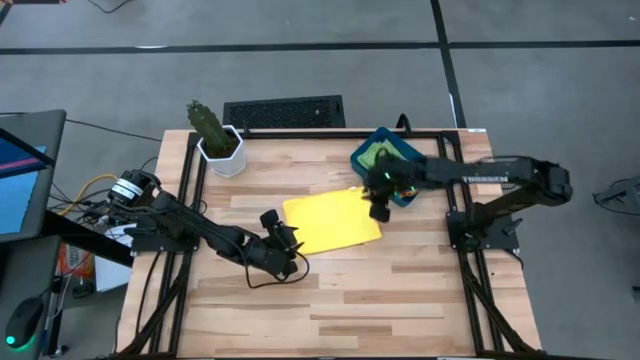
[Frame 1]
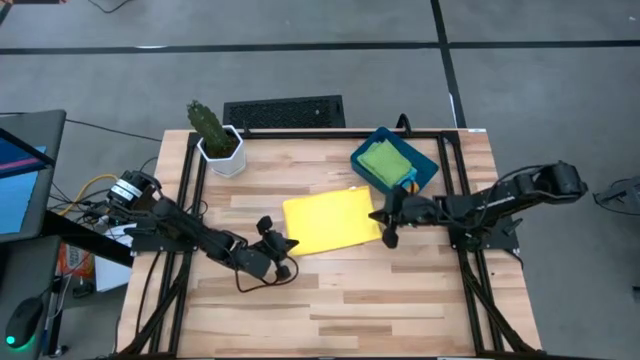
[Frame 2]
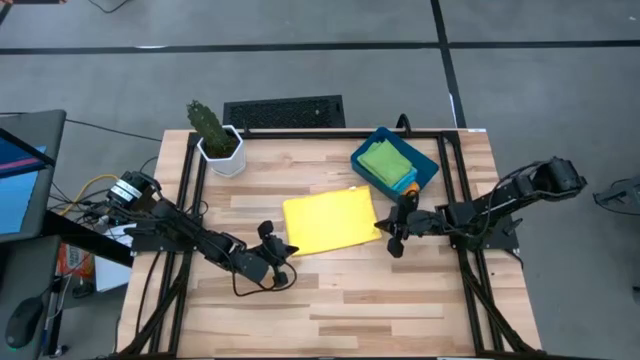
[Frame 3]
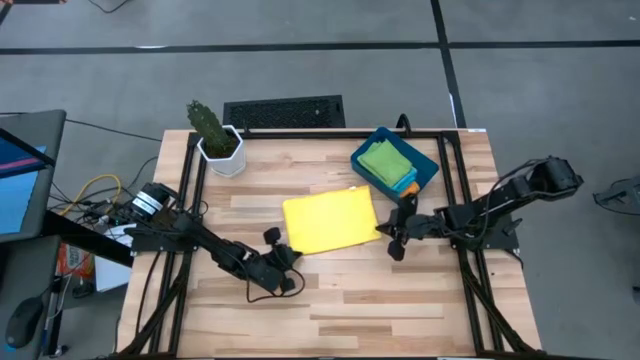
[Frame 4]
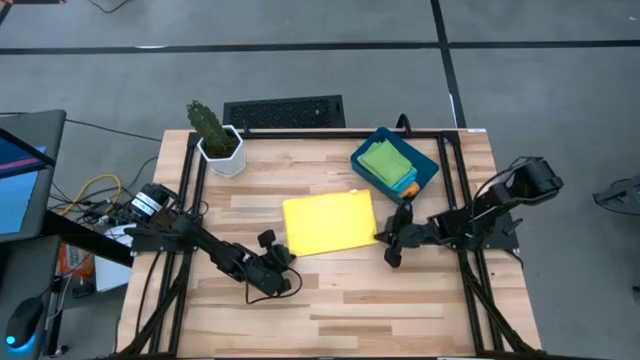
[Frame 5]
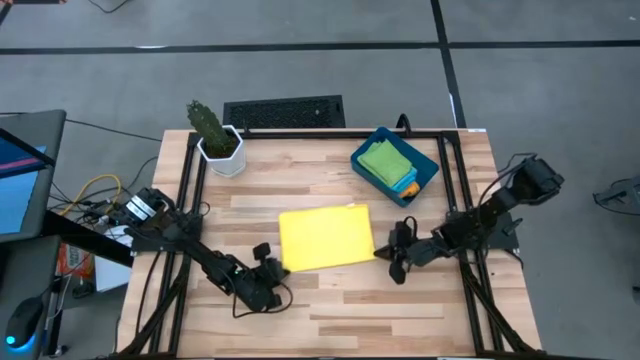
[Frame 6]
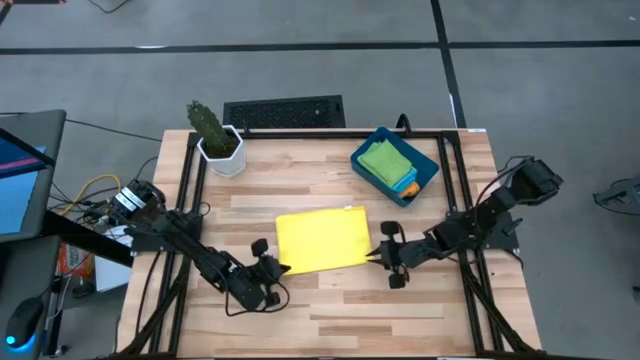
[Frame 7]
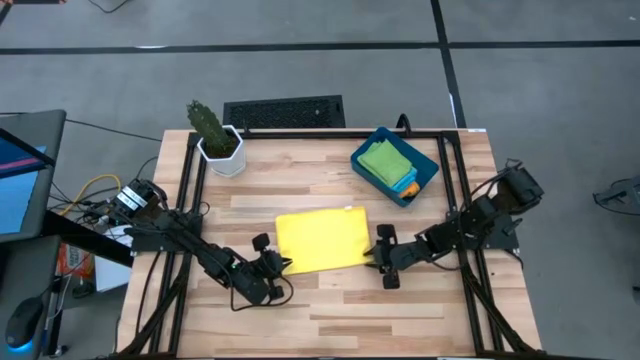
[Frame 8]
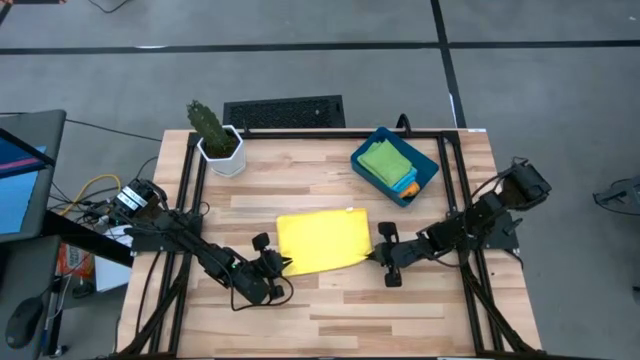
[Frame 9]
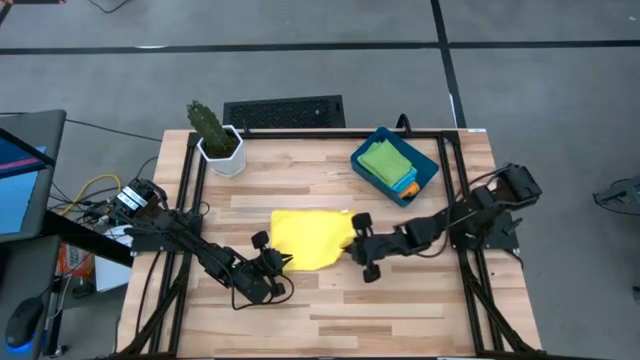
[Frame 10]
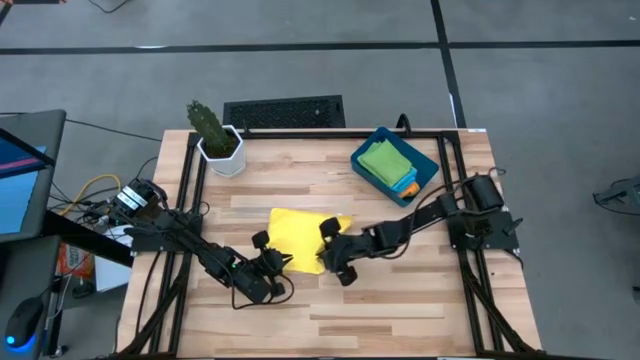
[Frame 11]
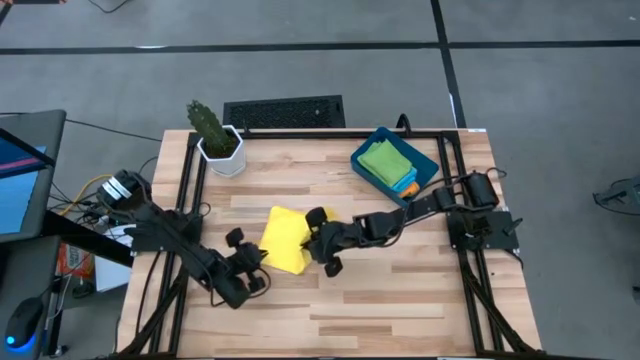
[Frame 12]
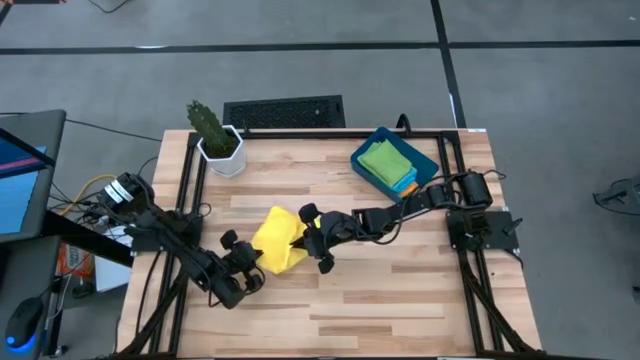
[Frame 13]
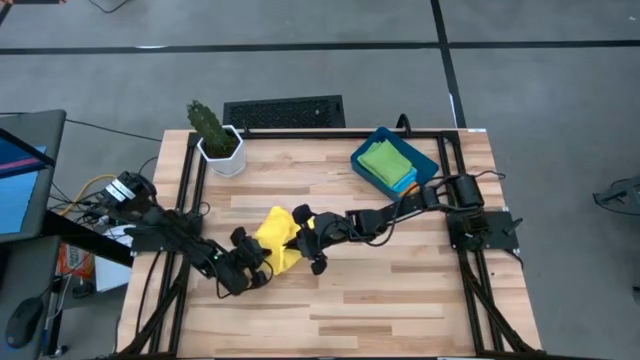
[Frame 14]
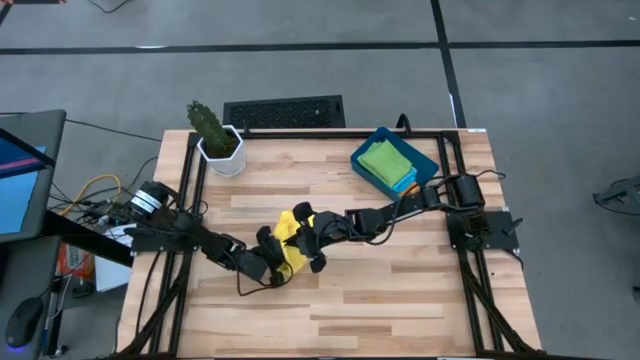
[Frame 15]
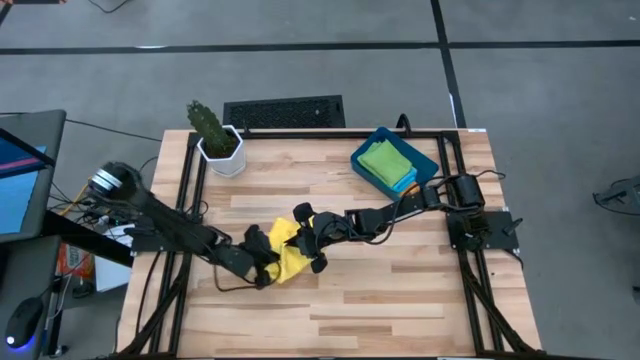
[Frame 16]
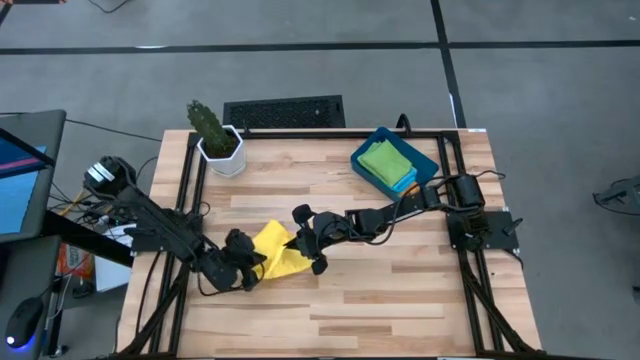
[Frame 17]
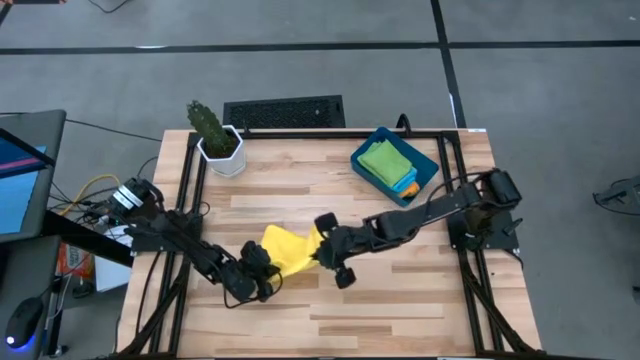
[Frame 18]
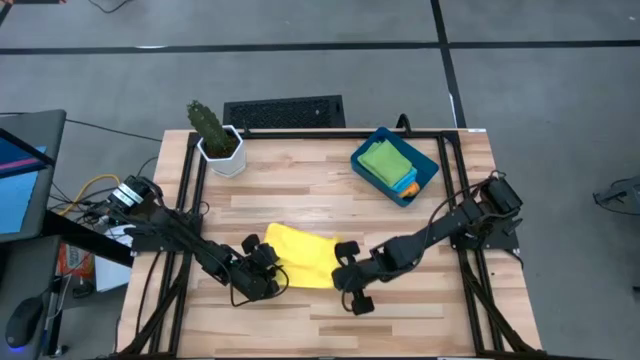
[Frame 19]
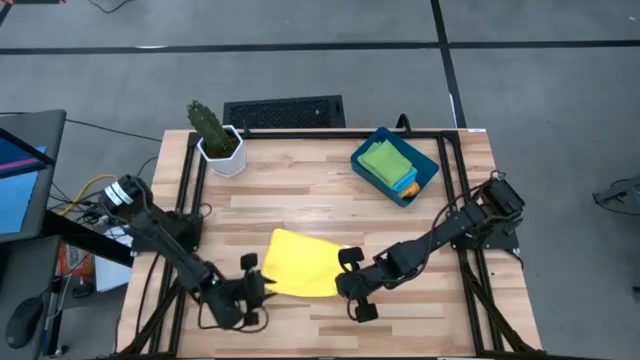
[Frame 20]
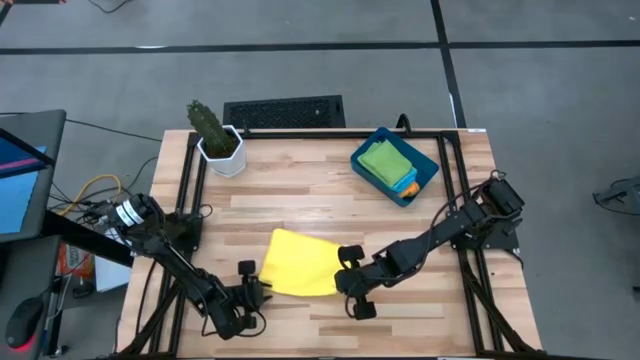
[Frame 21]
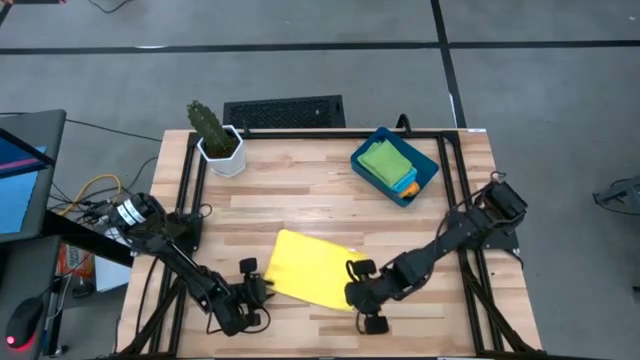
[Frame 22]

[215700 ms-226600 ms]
Task: Fold microfiber towels
Fold the yellow microfiber towel

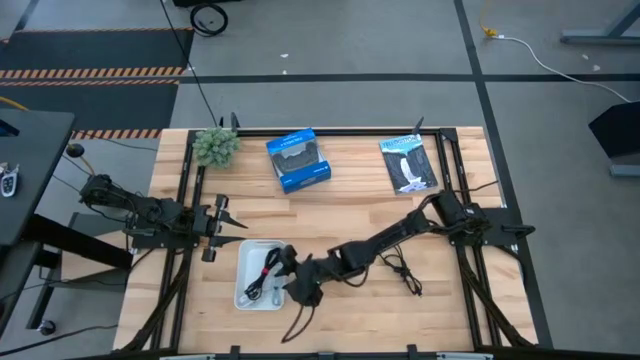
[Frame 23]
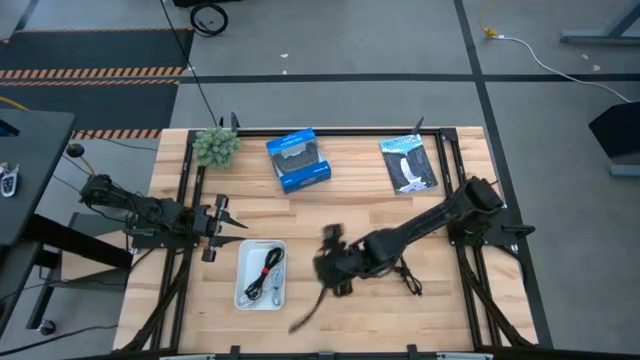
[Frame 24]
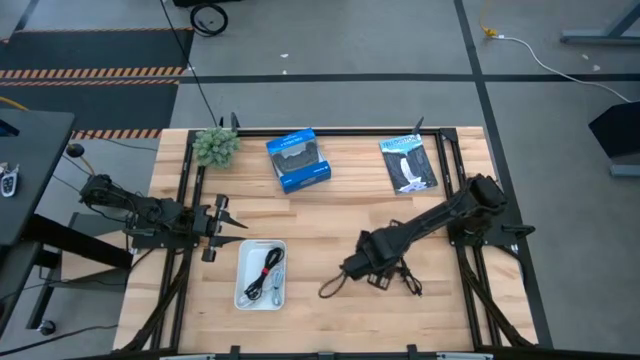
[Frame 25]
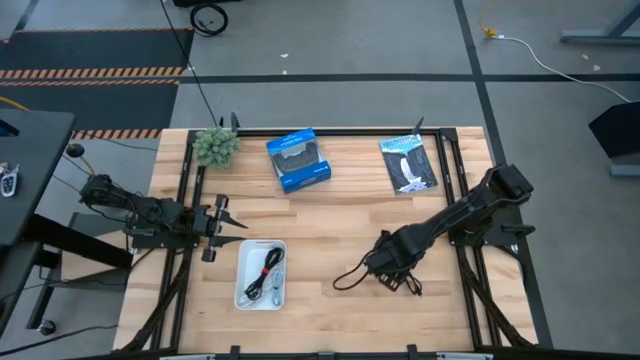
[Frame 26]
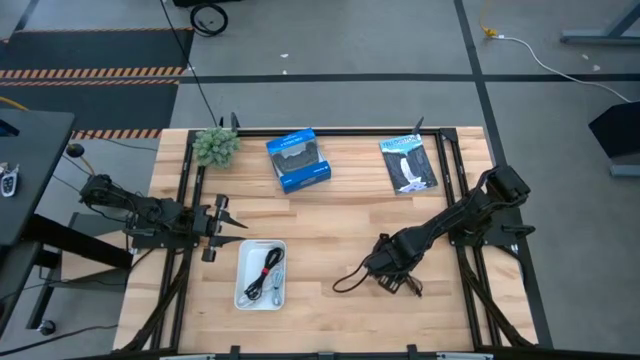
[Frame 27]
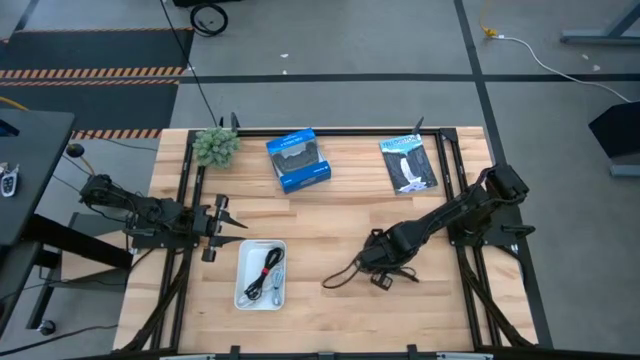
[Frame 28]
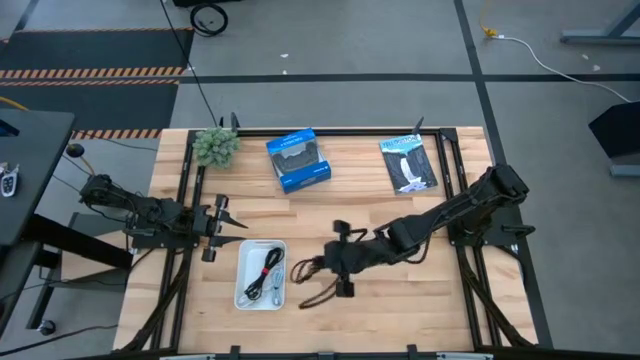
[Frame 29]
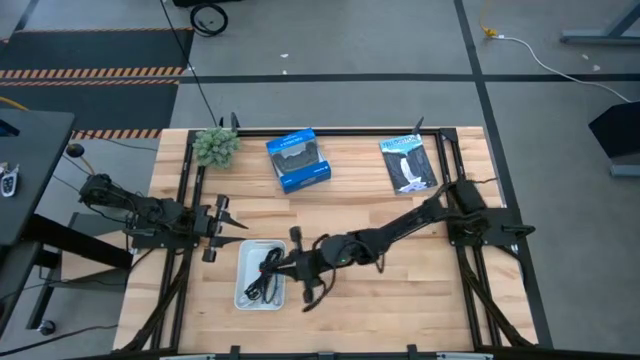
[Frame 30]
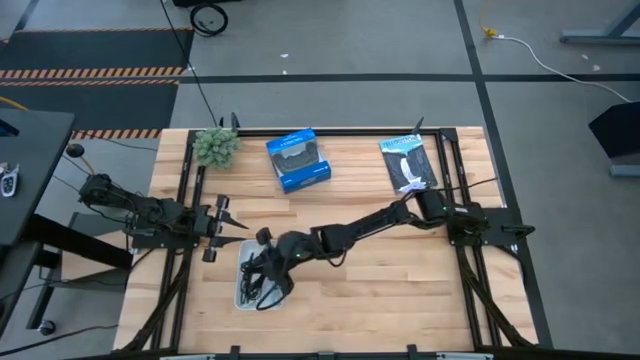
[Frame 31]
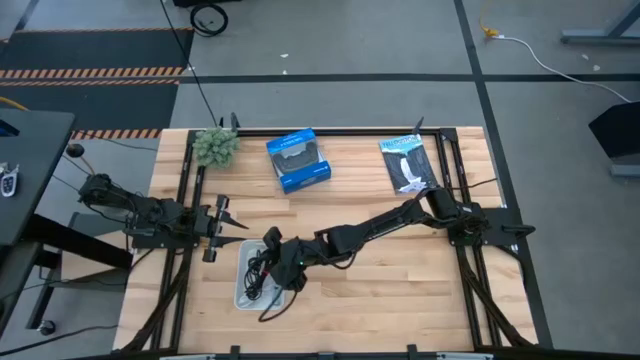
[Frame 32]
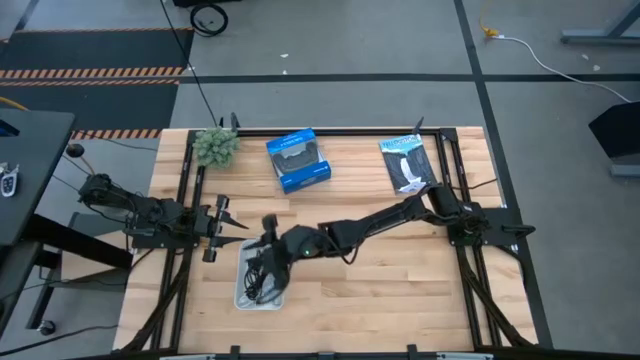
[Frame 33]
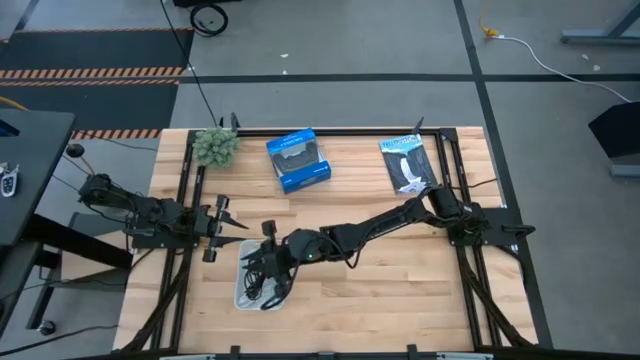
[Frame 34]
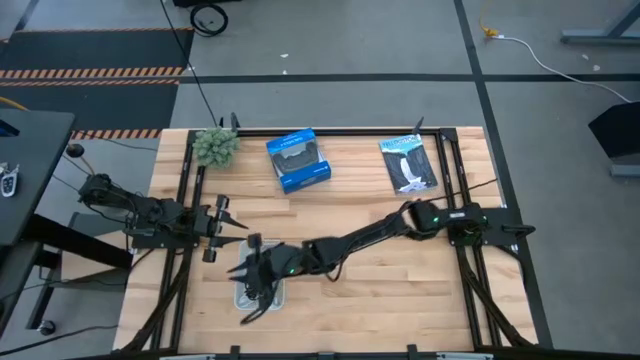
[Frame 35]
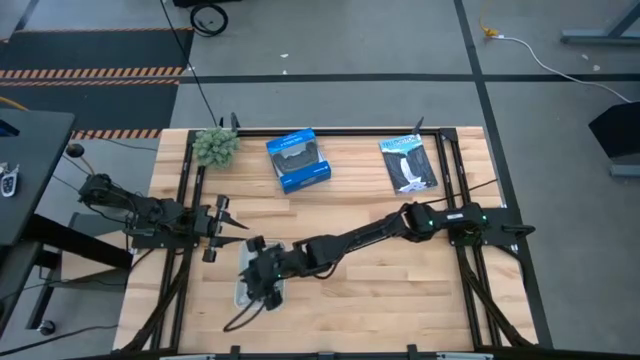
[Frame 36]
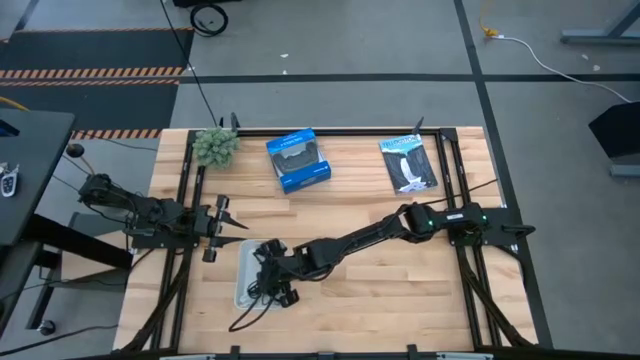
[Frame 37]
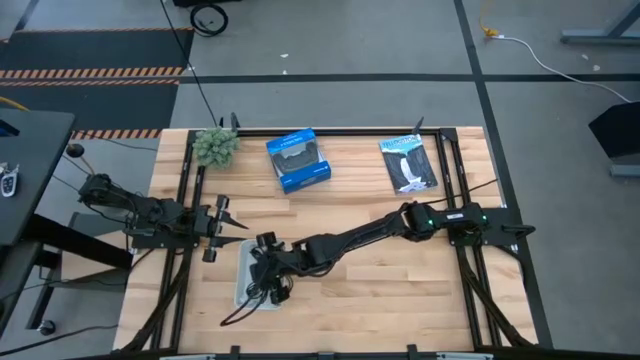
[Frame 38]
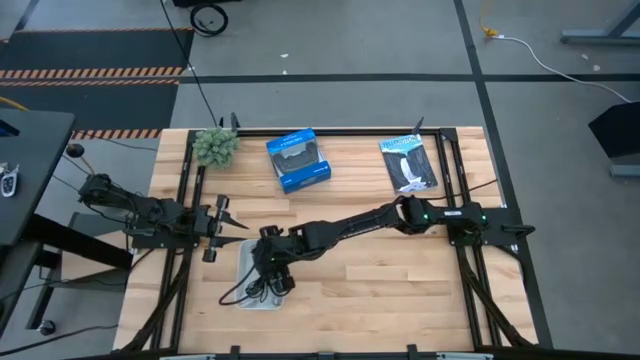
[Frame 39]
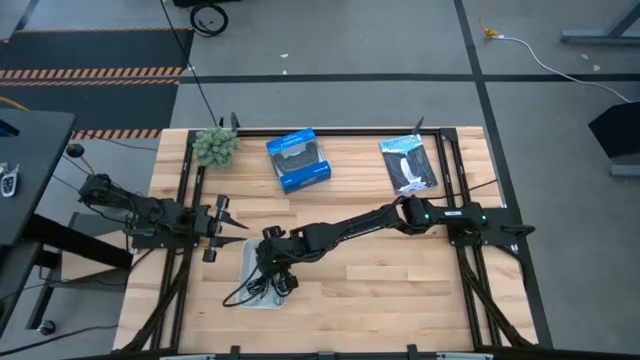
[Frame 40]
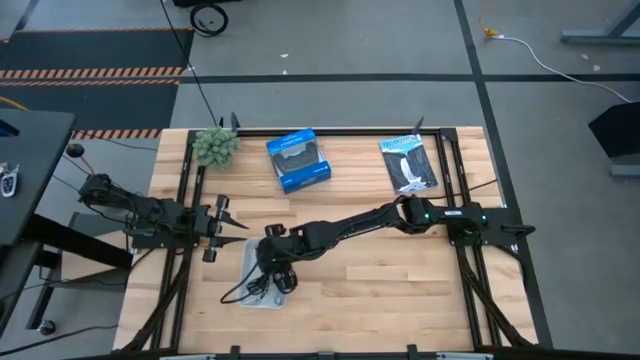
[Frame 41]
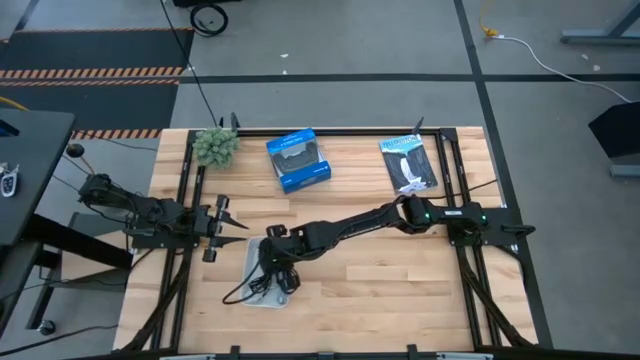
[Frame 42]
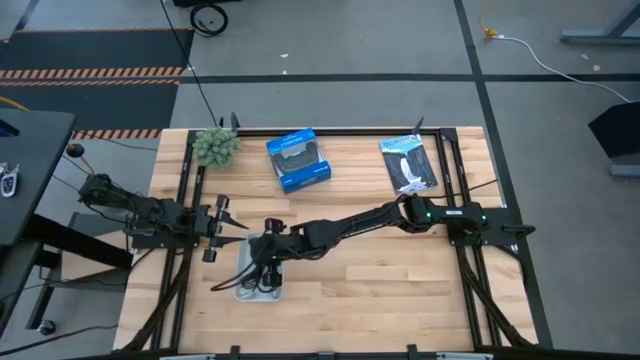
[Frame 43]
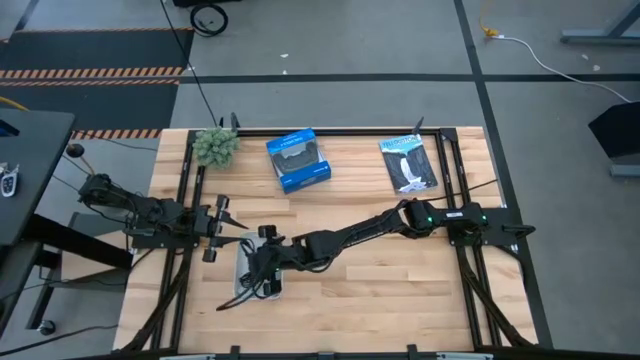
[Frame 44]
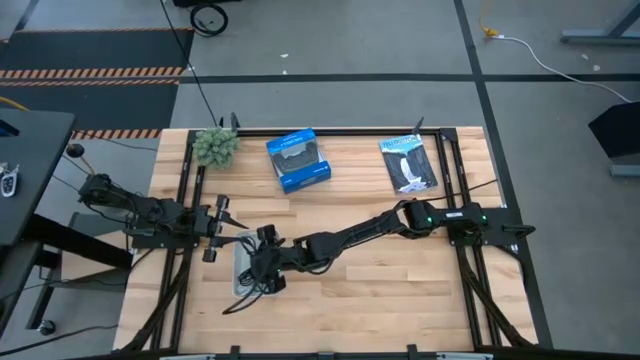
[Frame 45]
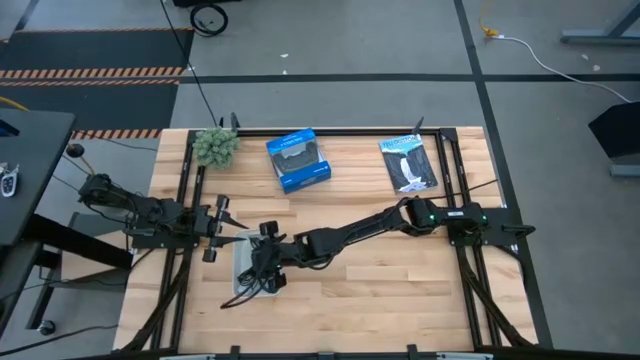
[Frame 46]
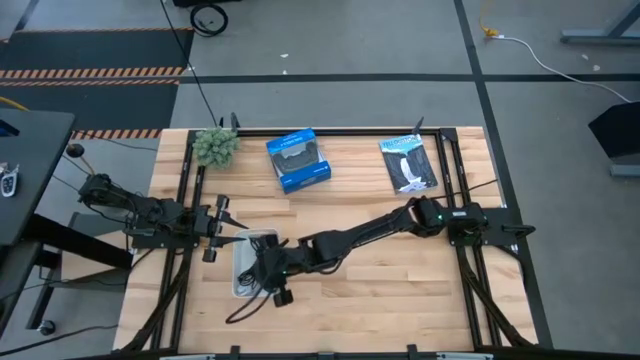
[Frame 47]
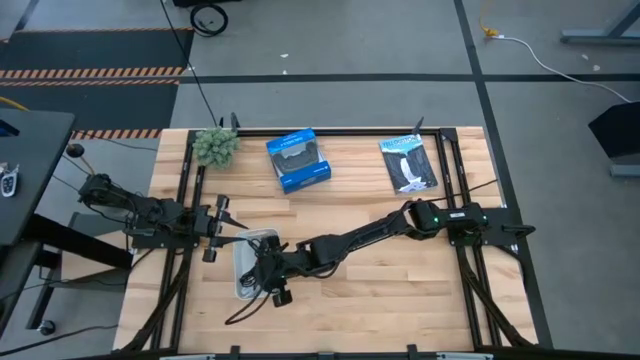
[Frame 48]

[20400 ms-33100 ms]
Task: Pick and place USB-C Cables
Put the black charger cable into the white bin
